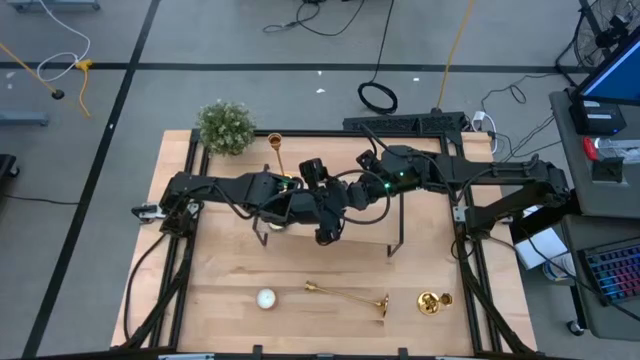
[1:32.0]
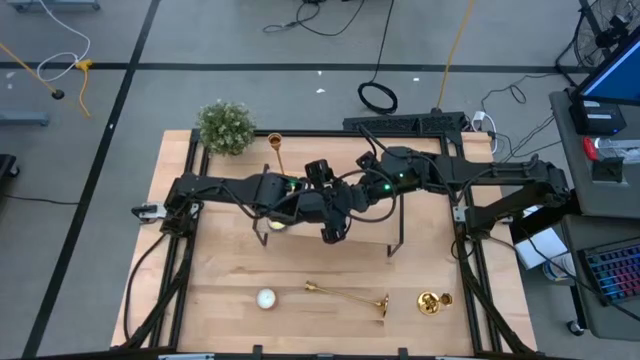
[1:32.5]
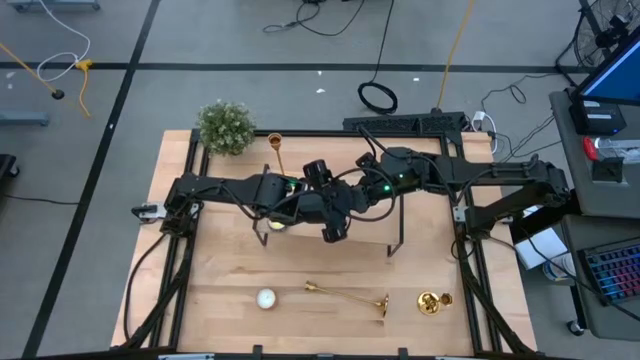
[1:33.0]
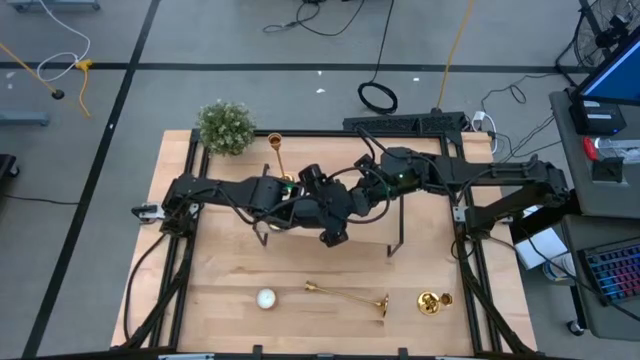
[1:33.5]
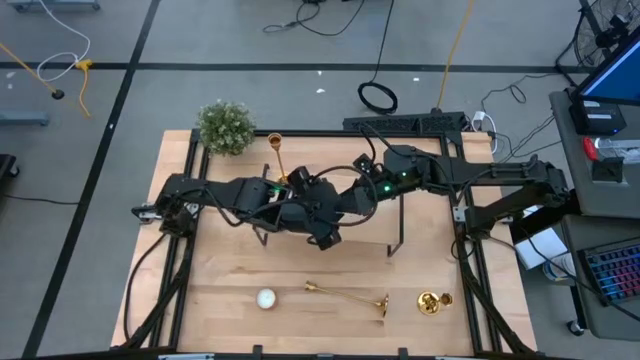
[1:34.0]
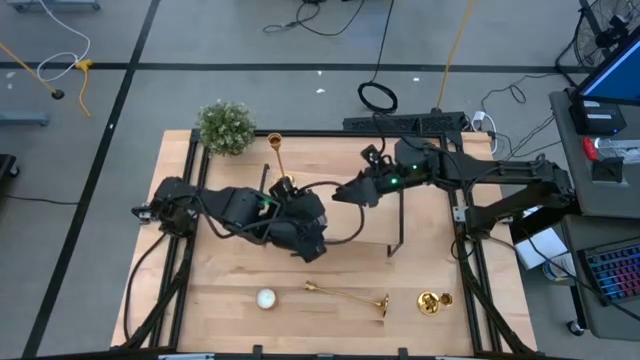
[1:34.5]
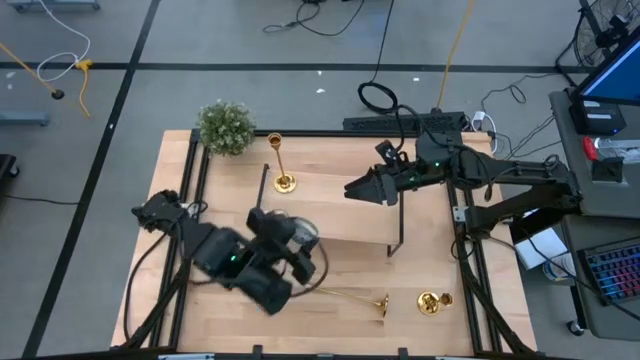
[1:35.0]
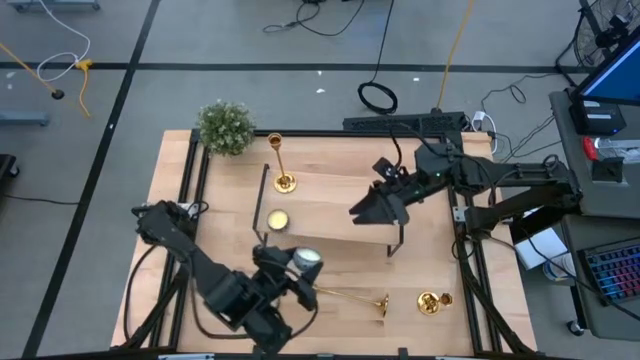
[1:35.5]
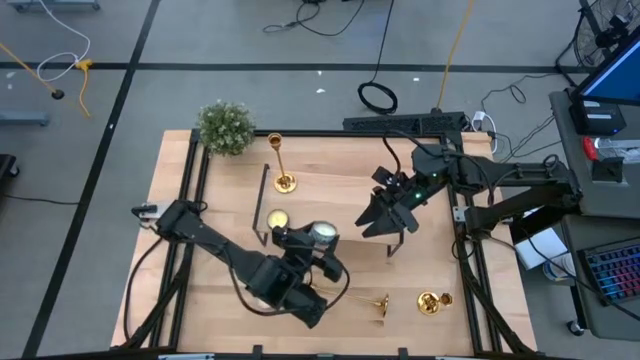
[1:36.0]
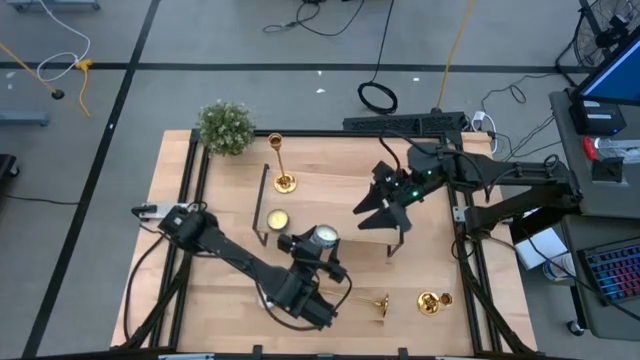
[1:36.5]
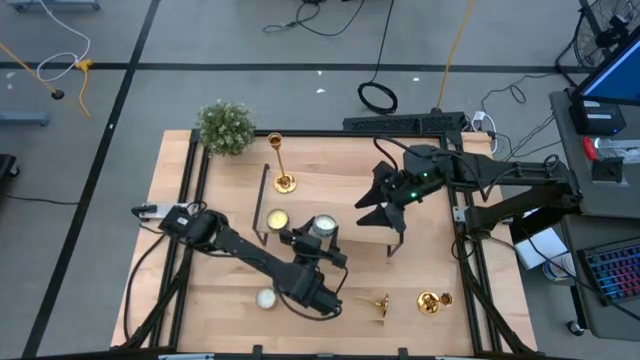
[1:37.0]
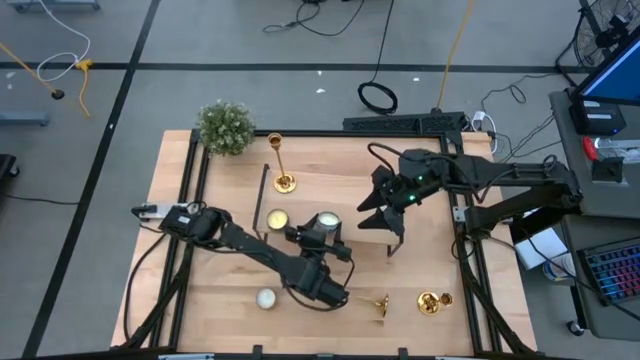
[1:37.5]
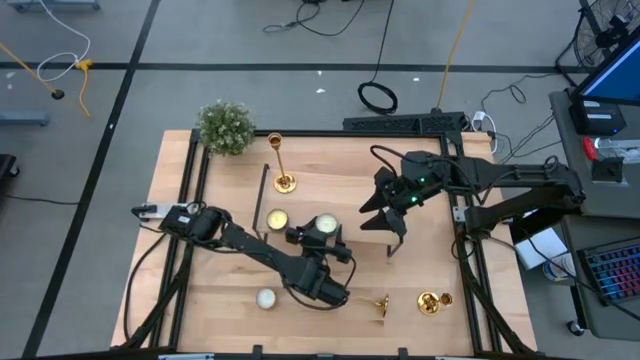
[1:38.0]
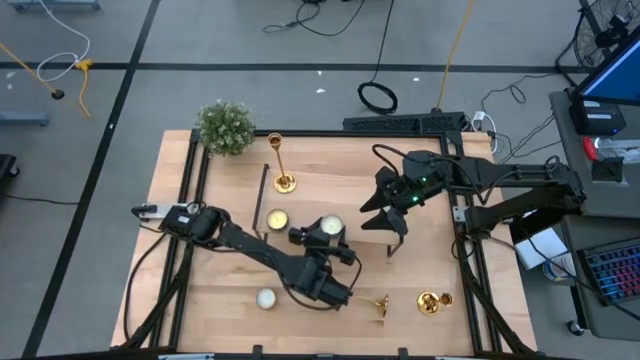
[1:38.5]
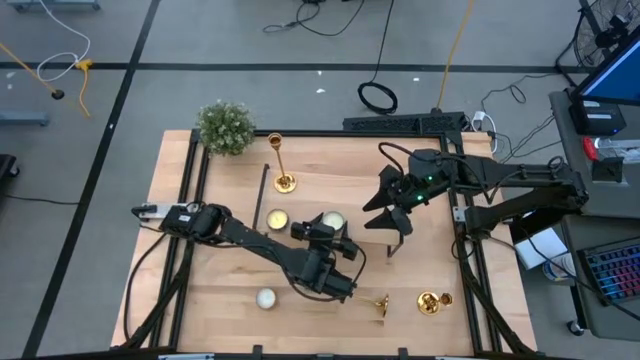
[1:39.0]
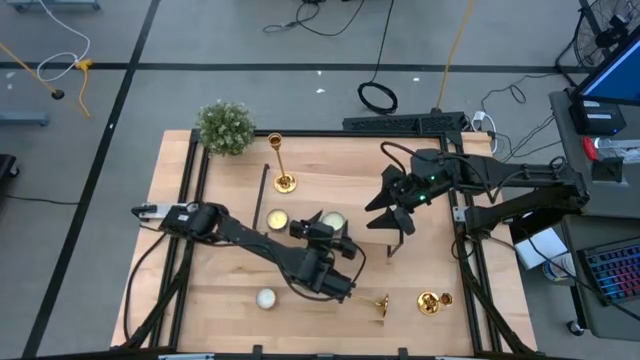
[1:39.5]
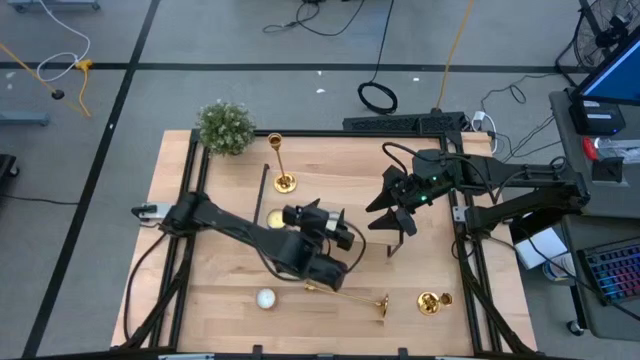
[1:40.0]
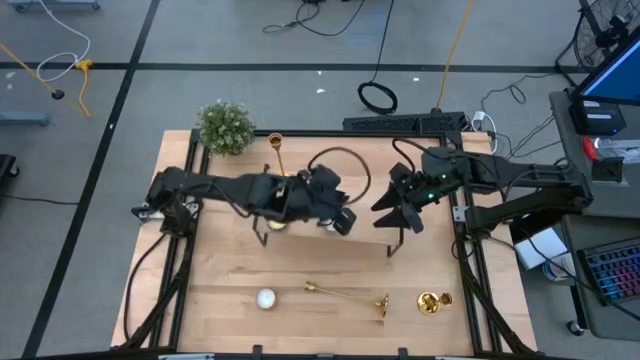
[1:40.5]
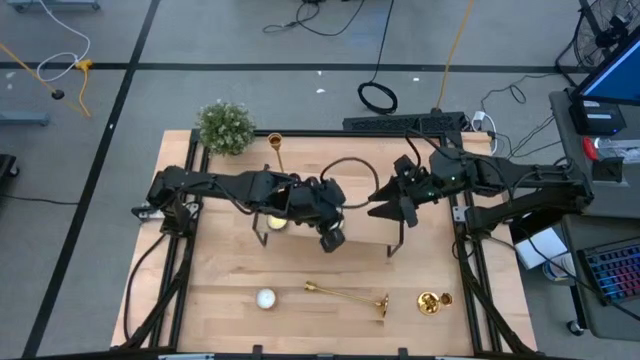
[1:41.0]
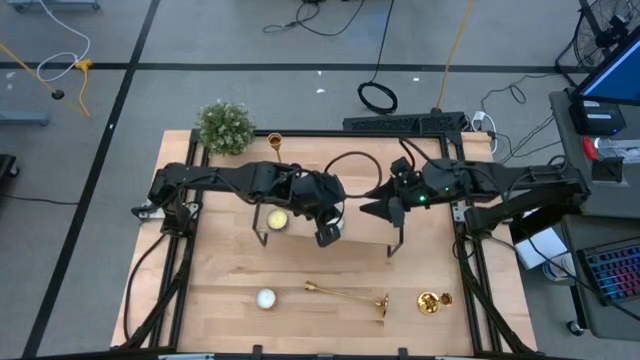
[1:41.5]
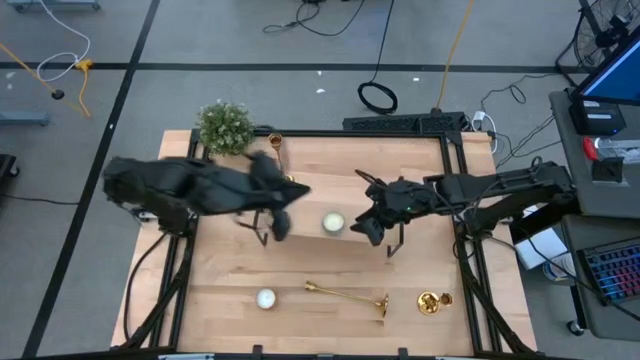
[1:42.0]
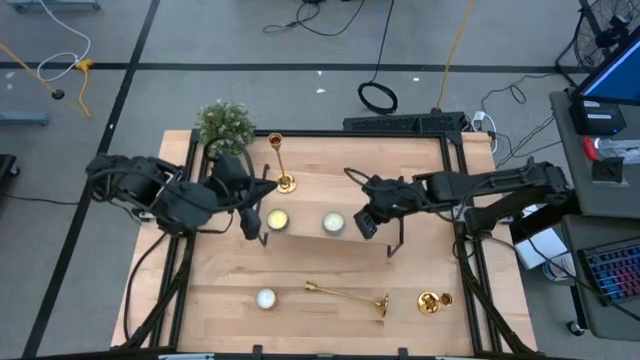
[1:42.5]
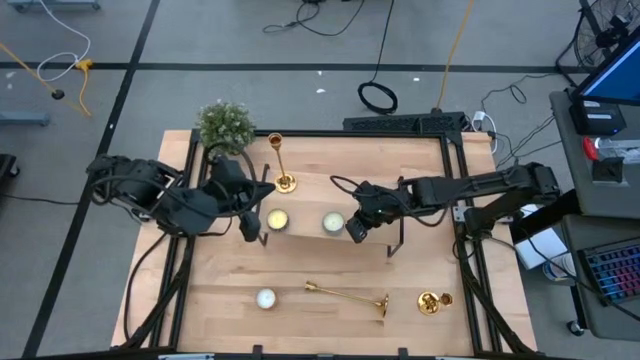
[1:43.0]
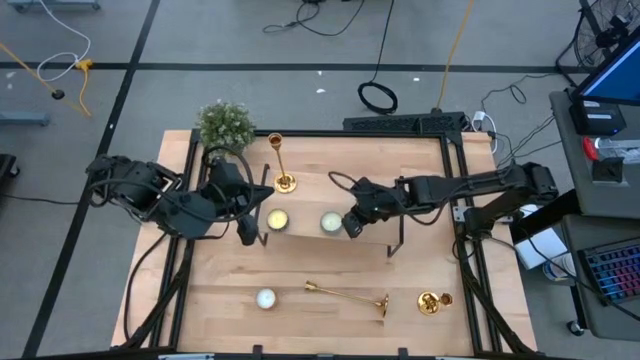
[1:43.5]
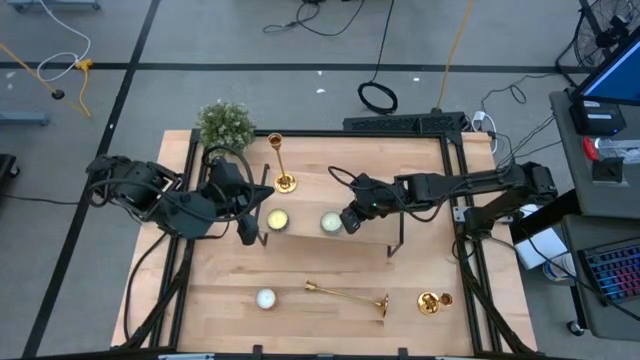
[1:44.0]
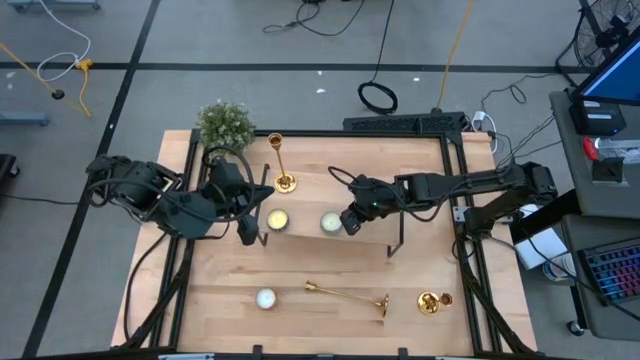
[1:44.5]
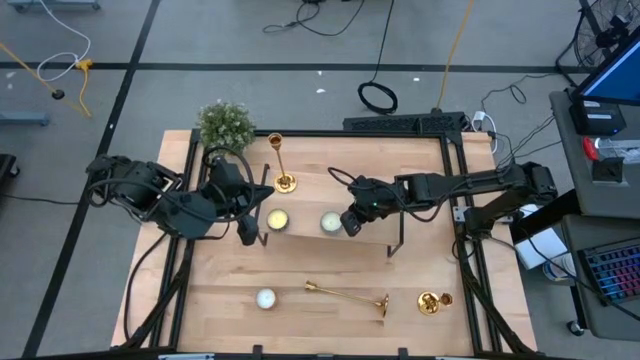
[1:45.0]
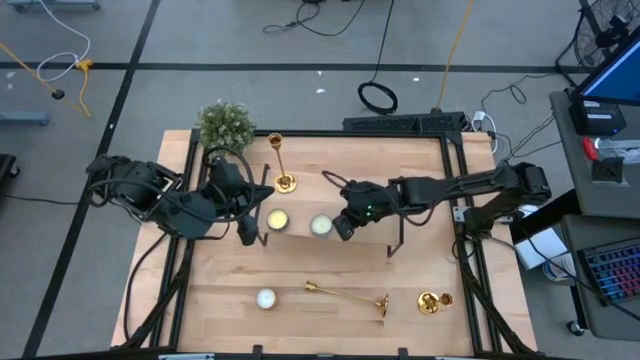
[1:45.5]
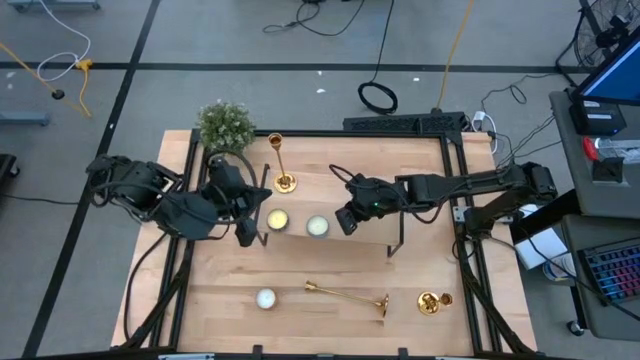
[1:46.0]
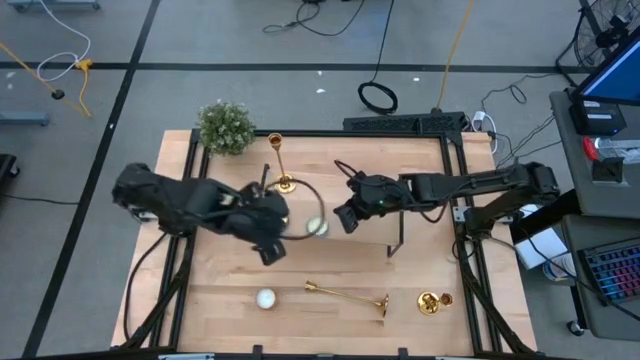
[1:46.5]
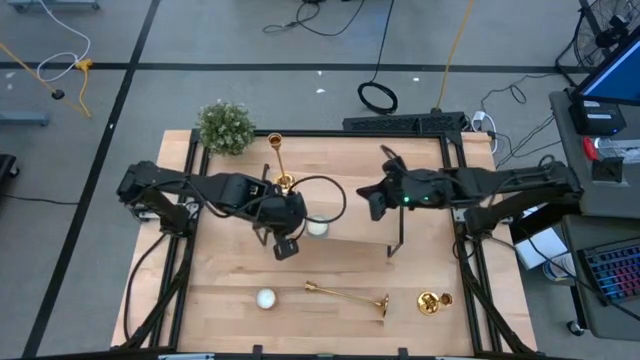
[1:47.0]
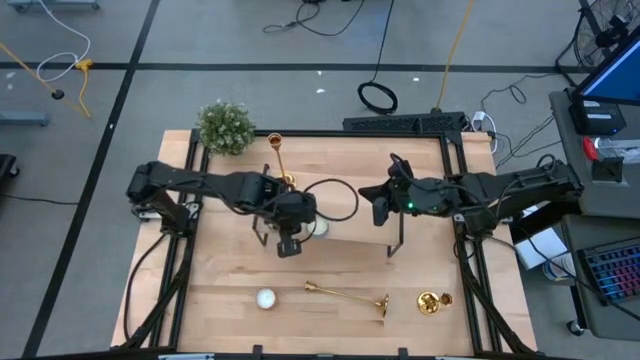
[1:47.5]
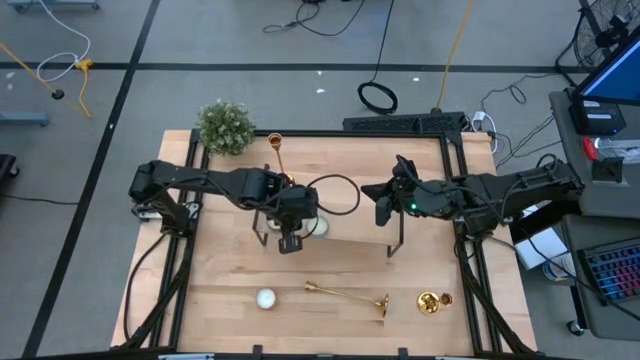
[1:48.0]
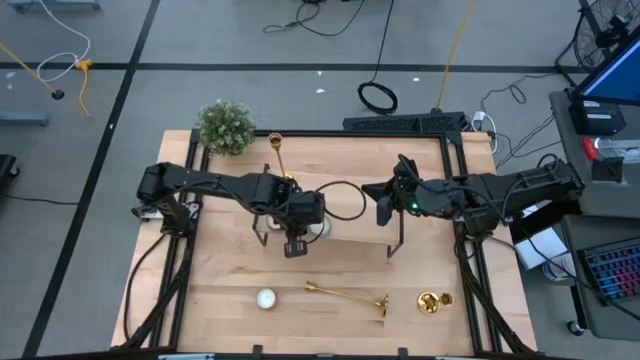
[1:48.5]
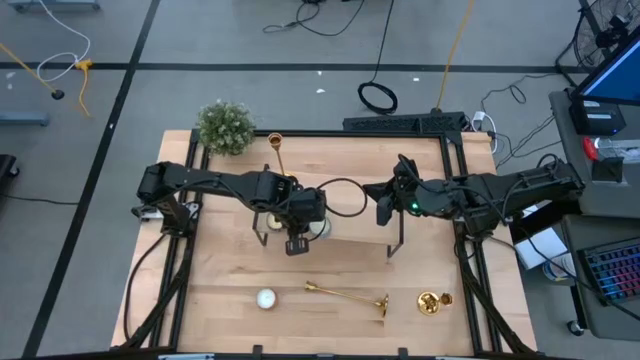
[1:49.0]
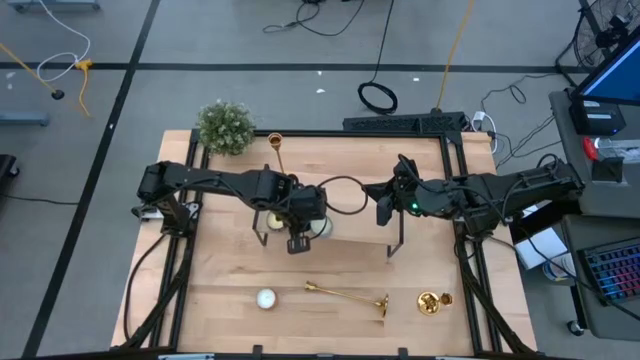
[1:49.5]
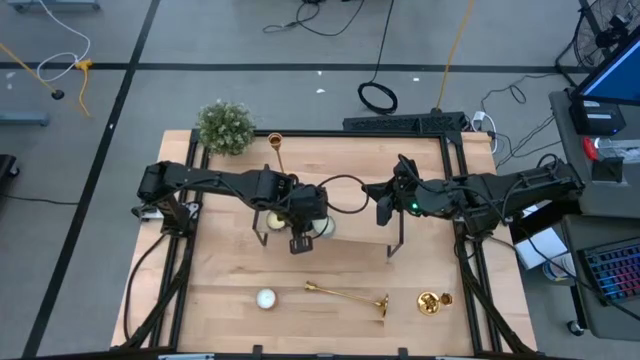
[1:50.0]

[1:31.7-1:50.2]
Task: Pick & Place candle stick holders
Put the blue scented candle on the shelf
